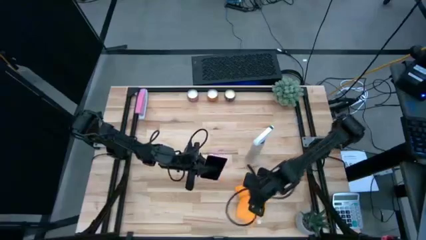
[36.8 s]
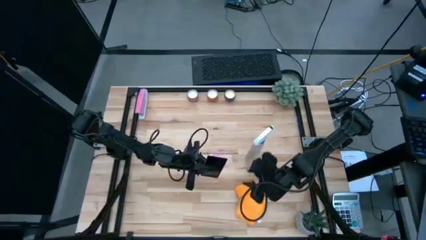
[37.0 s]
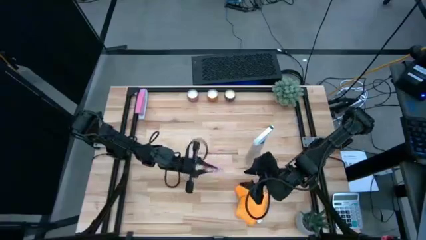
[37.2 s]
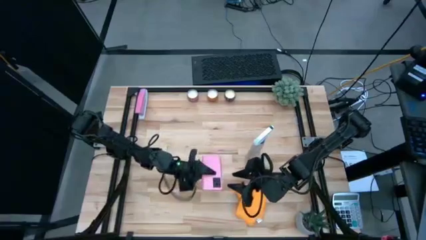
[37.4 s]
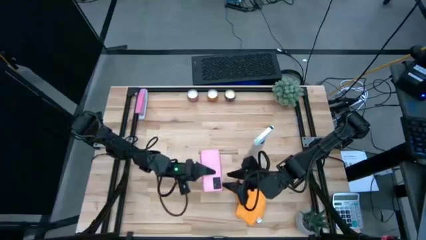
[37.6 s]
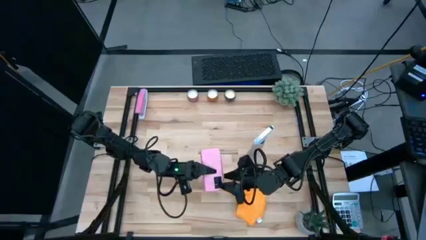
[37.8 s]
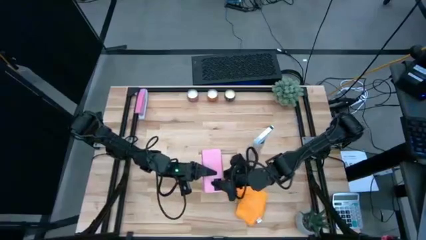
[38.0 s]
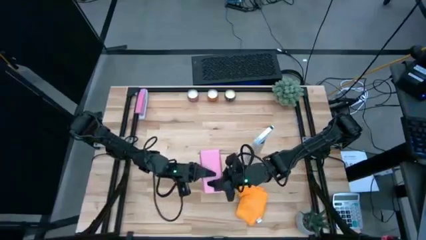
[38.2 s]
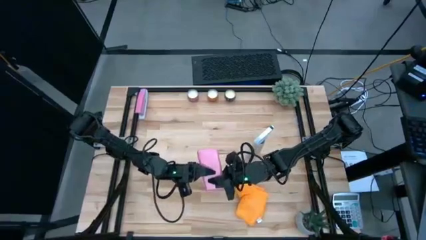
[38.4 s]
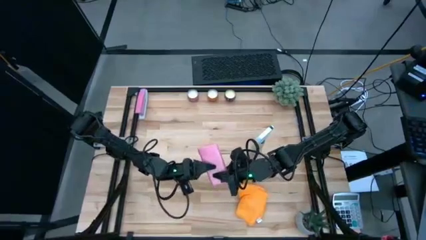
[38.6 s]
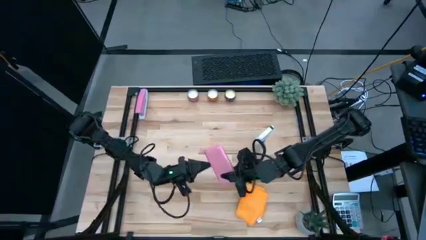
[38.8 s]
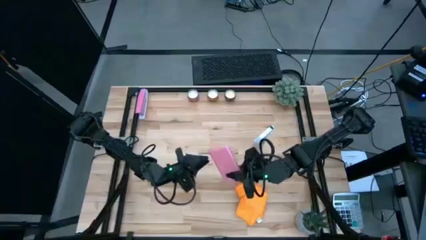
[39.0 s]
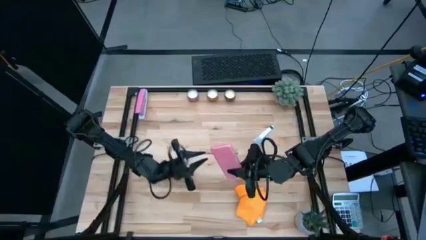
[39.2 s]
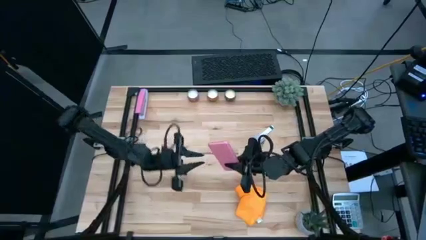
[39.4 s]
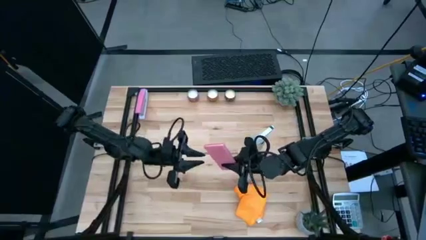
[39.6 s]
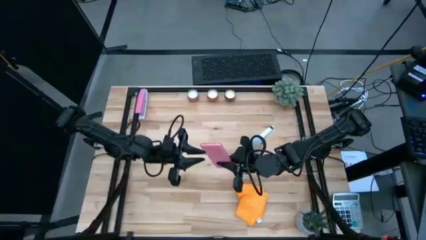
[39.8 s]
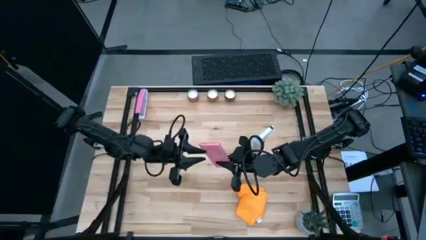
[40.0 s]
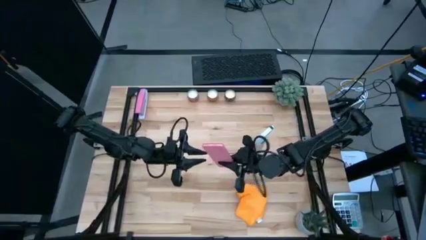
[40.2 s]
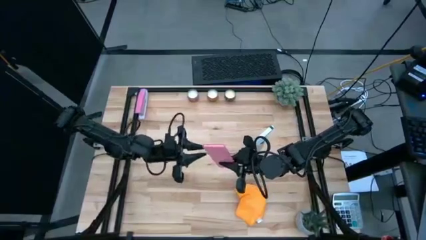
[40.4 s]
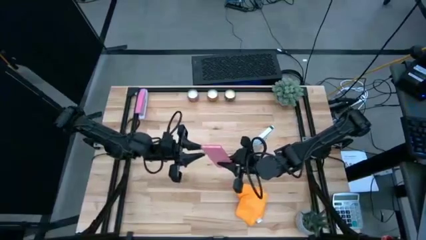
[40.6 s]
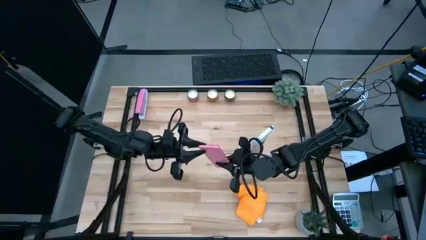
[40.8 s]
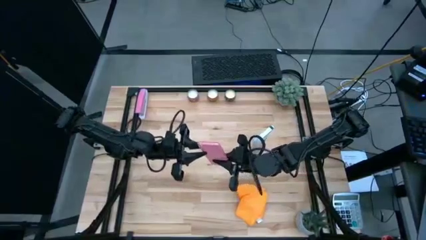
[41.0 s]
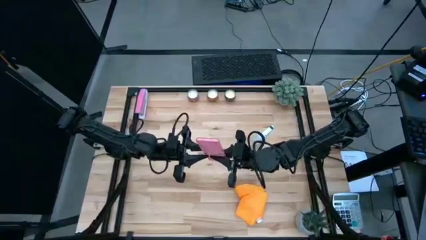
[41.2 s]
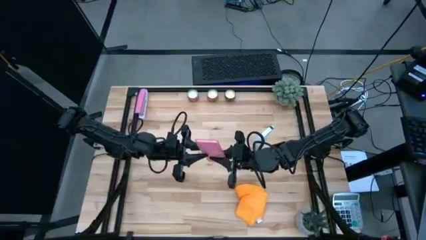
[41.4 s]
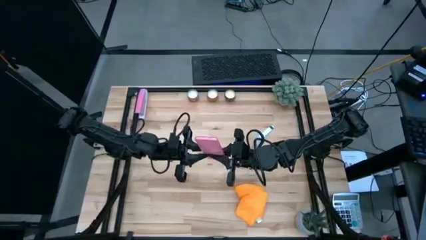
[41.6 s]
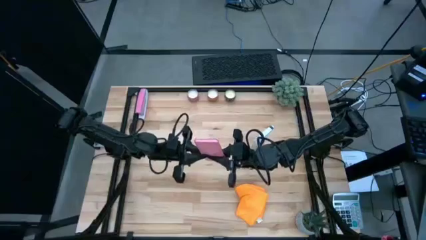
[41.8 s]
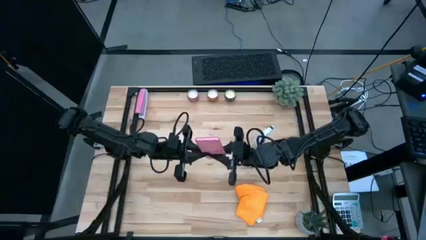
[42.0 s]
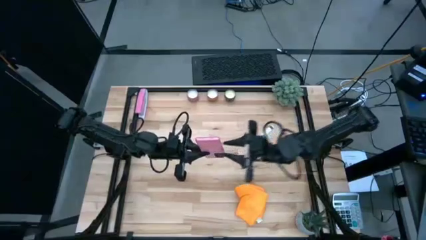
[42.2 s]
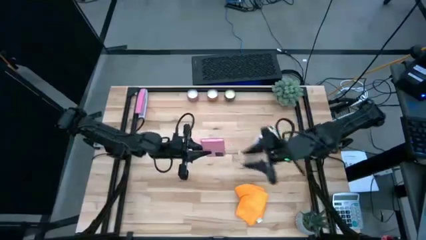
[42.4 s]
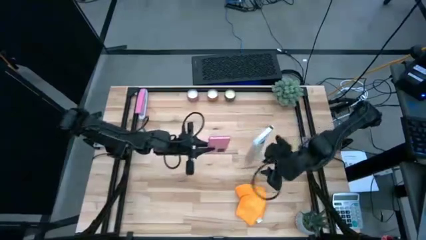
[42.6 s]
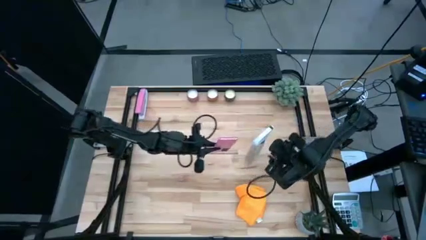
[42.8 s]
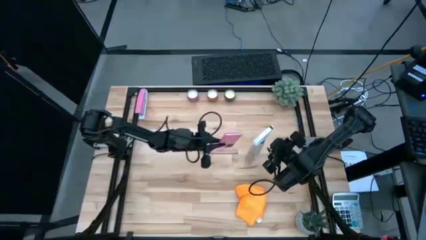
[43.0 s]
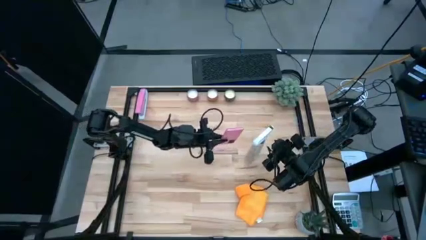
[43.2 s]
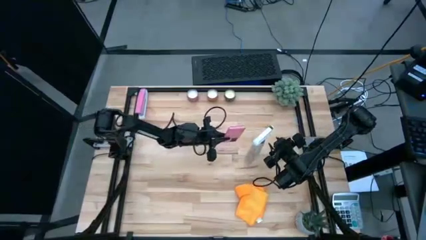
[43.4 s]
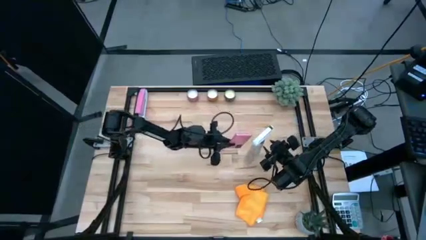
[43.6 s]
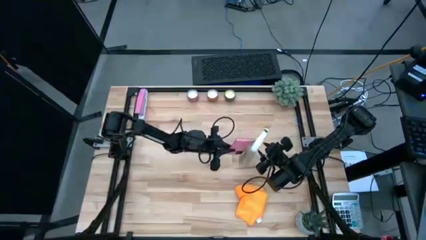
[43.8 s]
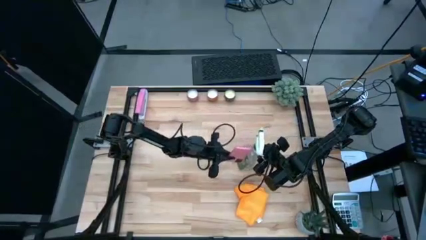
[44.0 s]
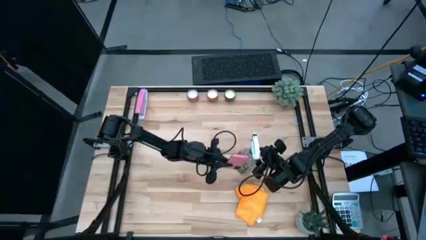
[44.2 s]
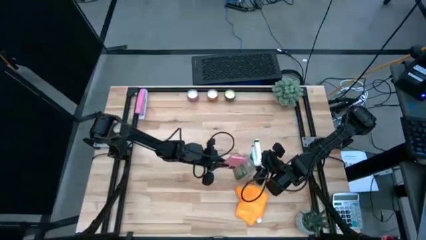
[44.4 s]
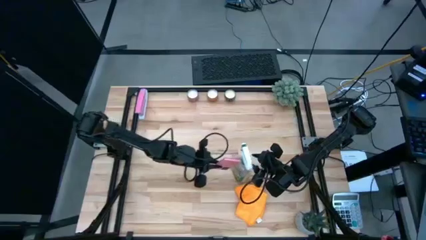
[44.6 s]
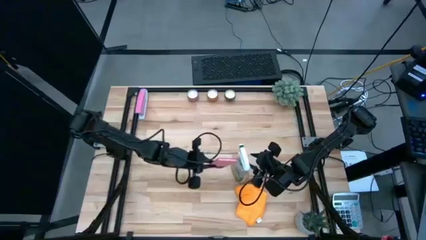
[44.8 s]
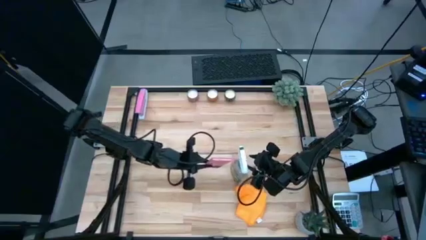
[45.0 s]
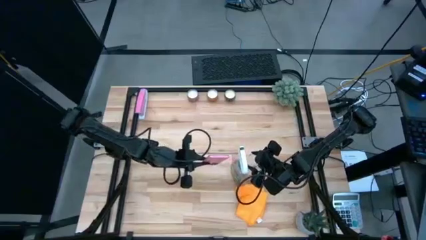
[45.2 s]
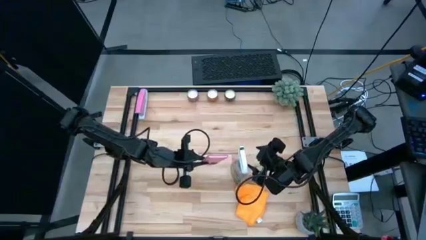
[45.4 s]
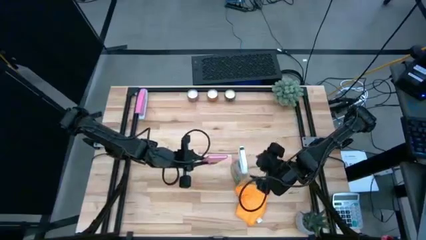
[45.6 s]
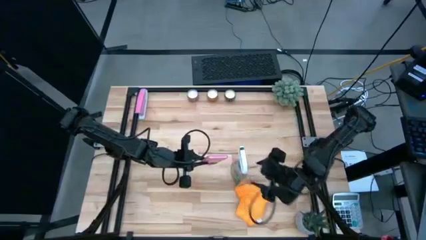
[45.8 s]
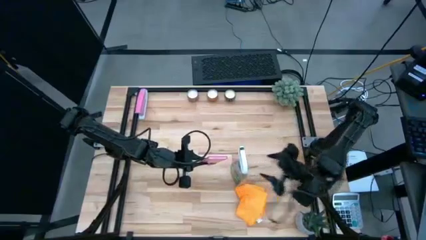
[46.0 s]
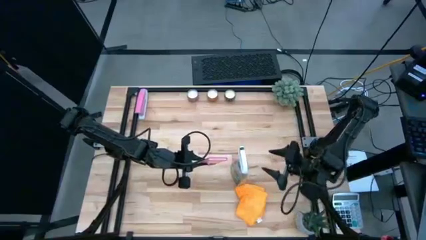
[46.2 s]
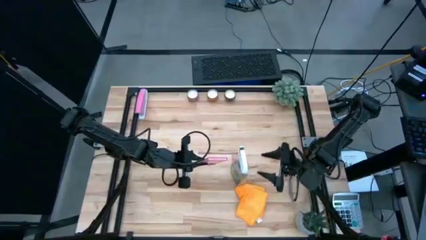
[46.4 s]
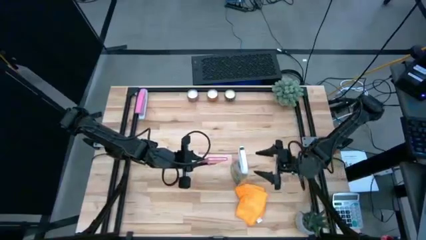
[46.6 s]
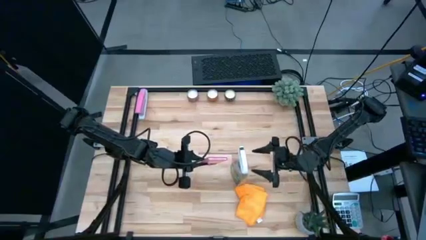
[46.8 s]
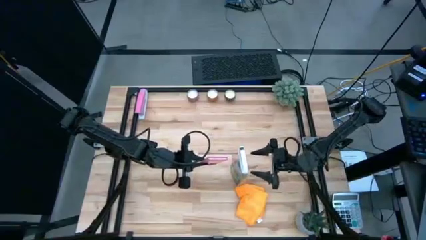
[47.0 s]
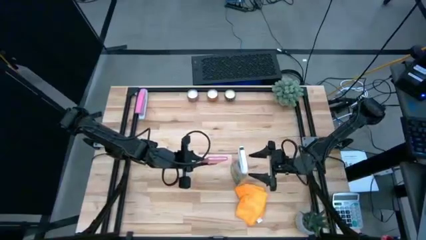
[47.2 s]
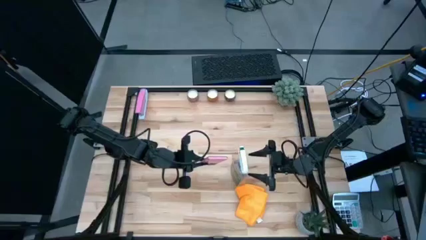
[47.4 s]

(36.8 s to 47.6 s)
Task: Apply microfiber cloth
Spray the back side of the cellphone using the spray bottle
